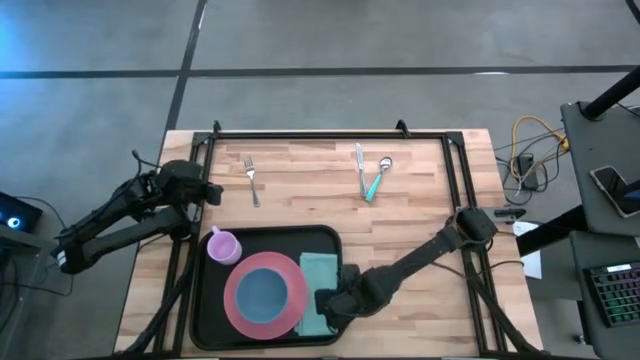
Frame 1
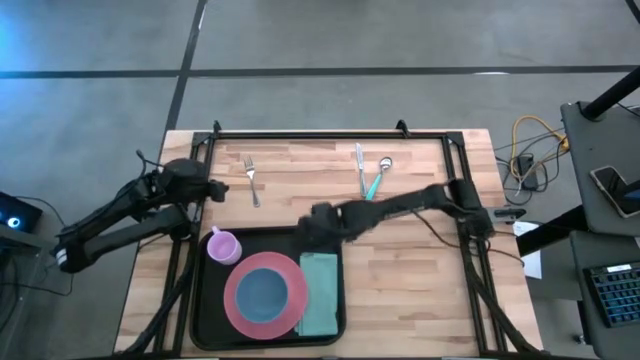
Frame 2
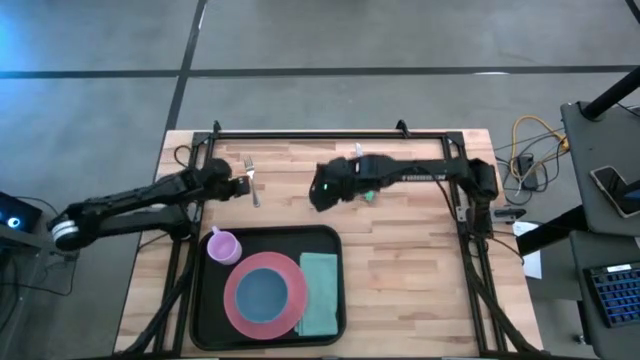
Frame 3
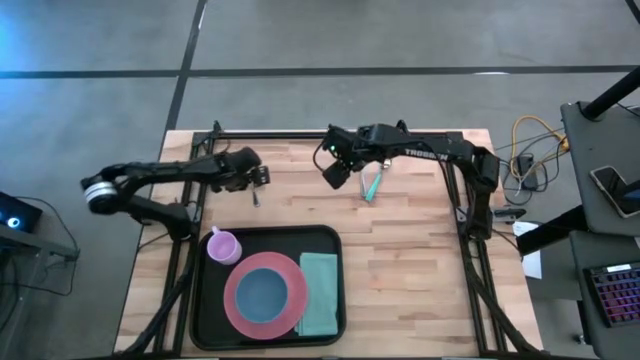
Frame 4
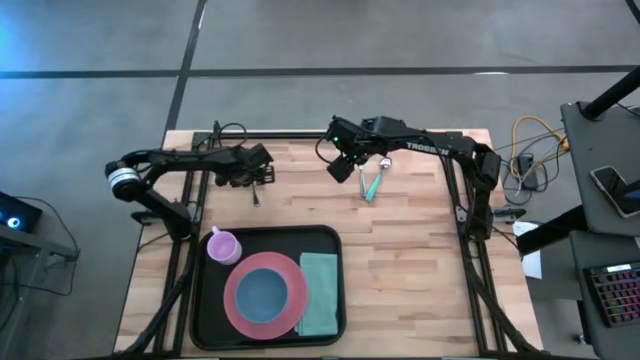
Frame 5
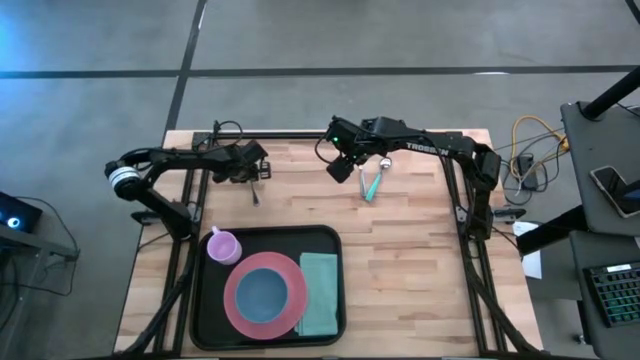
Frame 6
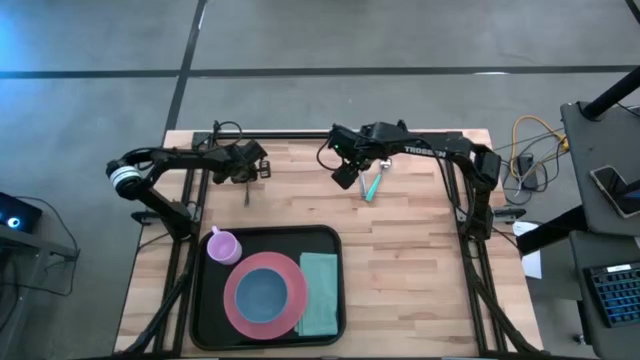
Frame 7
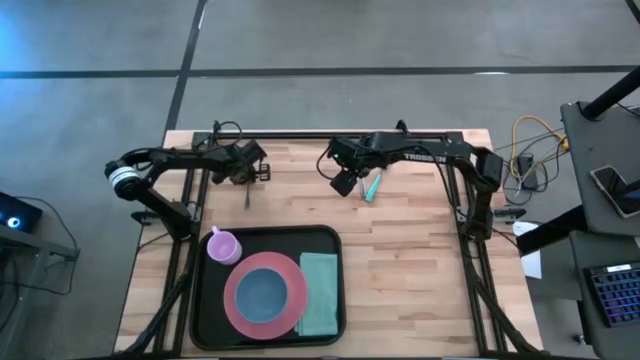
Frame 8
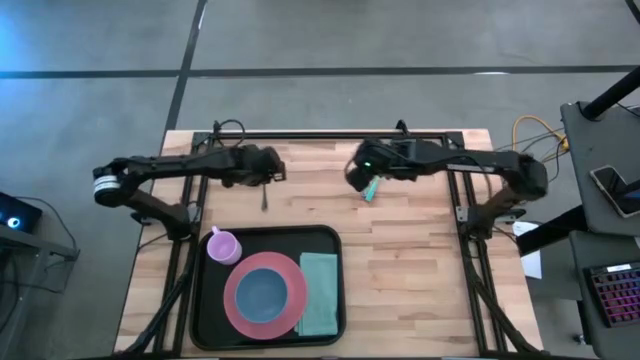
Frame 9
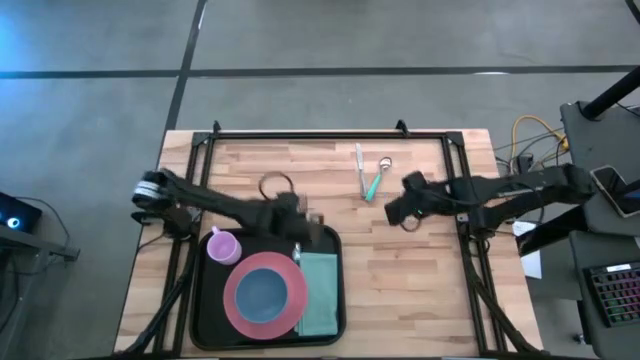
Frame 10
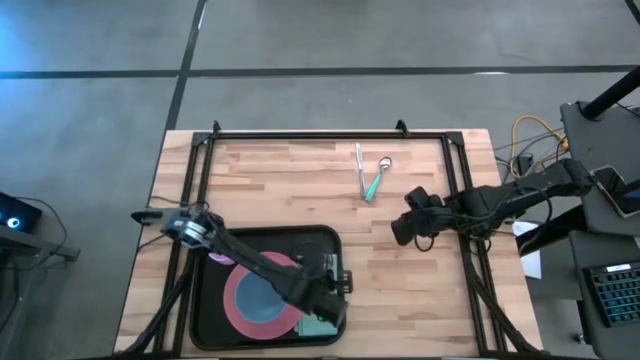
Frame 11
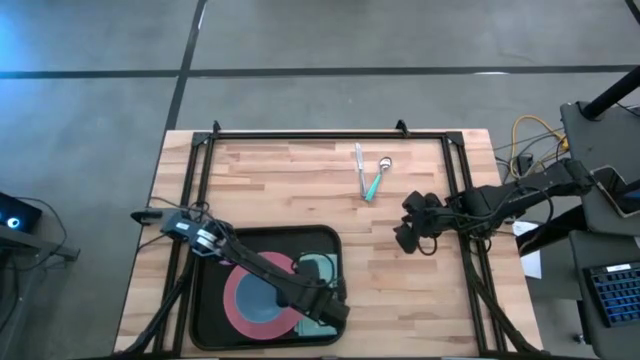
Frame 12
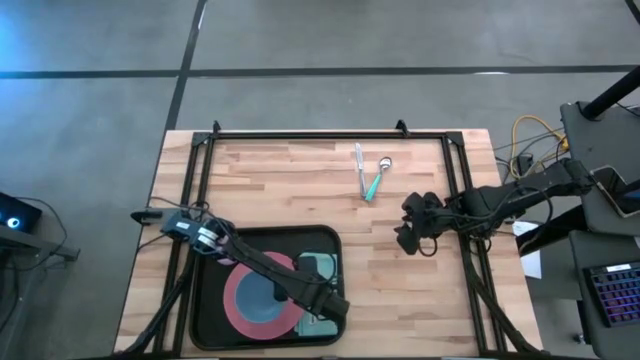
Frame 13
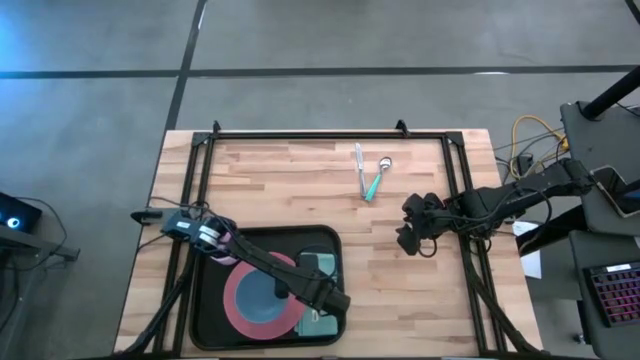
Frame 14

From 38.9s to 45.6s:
Task: Set up tray
Put the fork on top of the table napkin beside the pink plate on the black tray

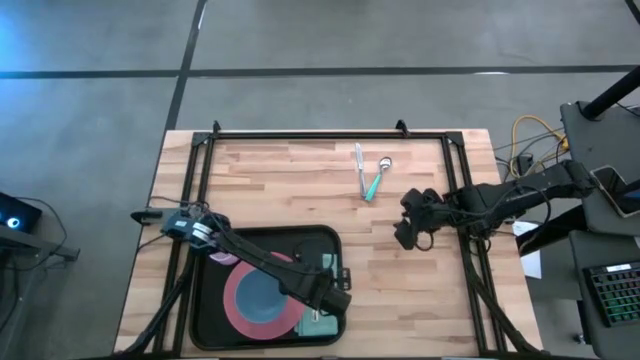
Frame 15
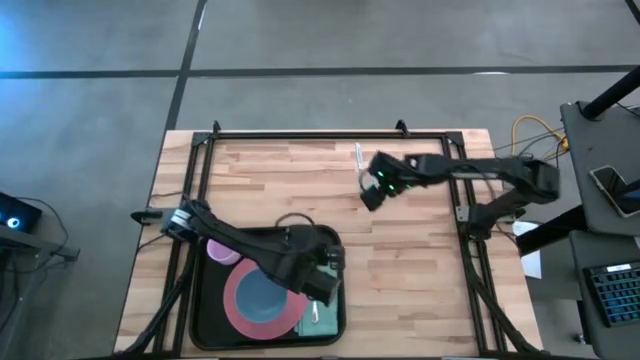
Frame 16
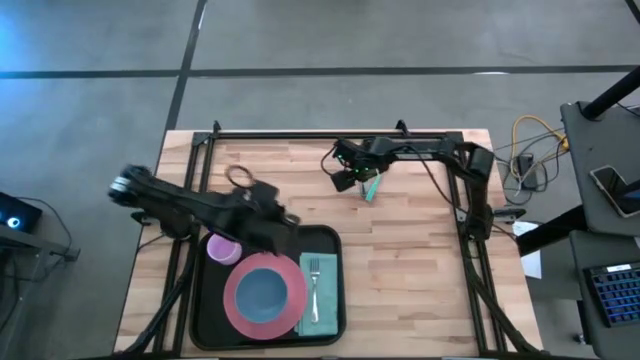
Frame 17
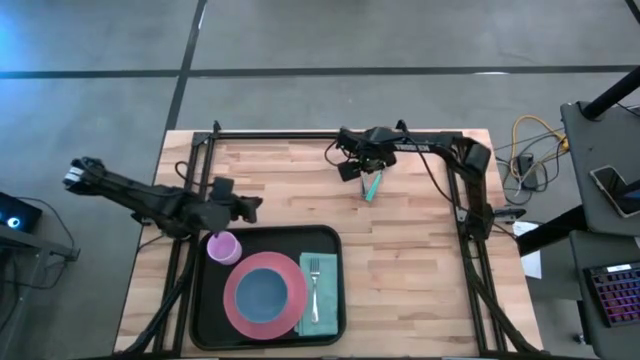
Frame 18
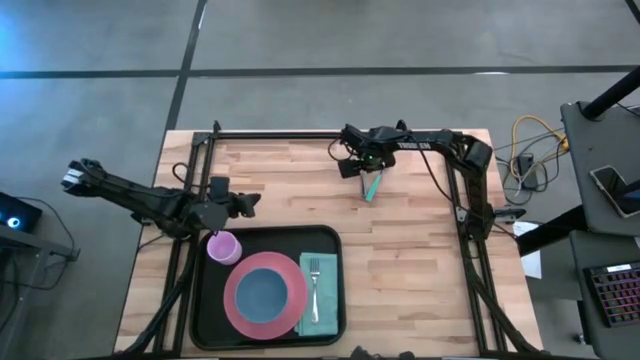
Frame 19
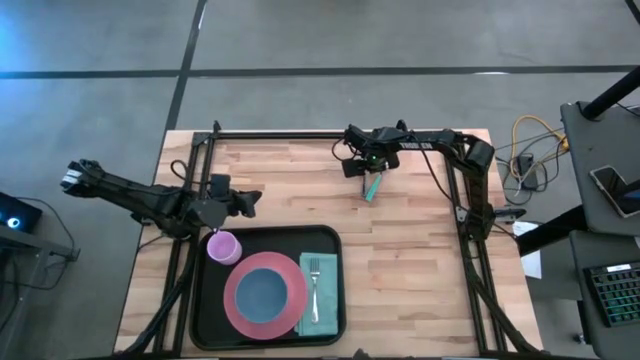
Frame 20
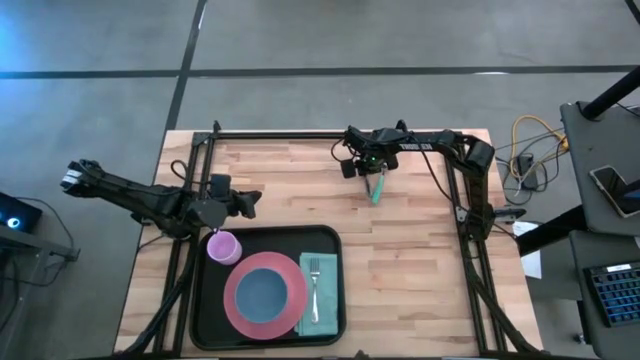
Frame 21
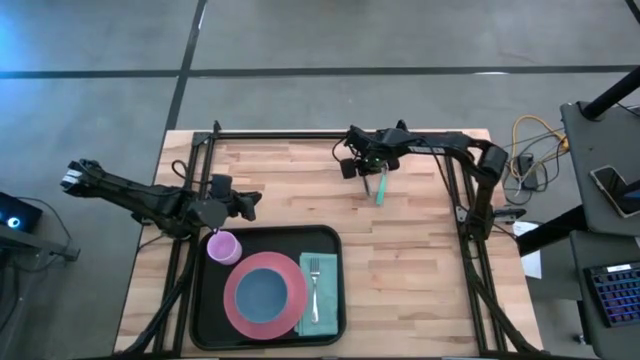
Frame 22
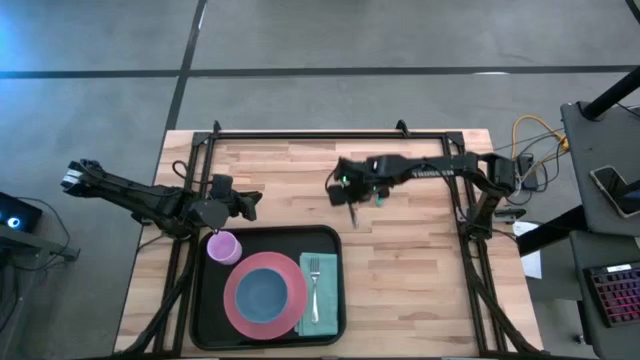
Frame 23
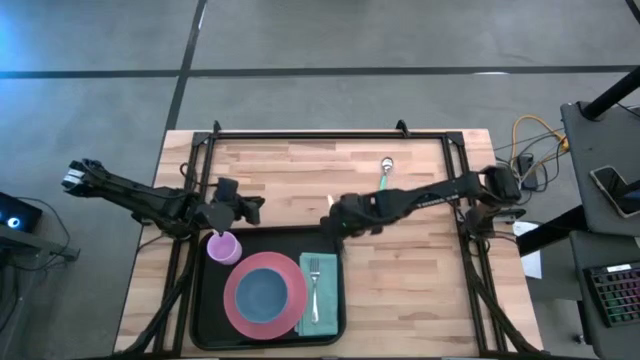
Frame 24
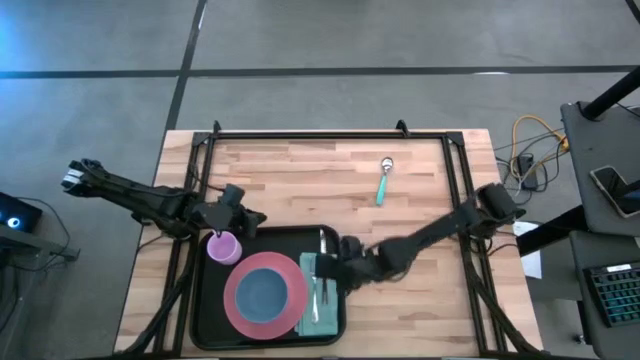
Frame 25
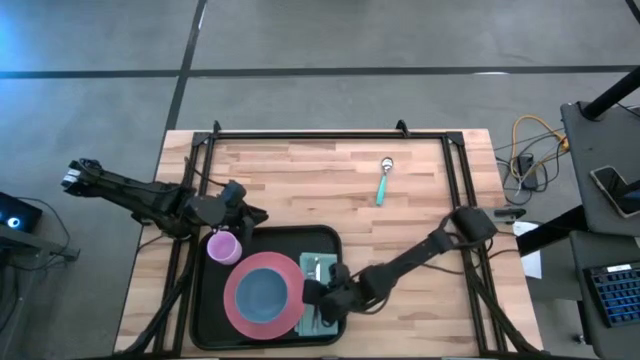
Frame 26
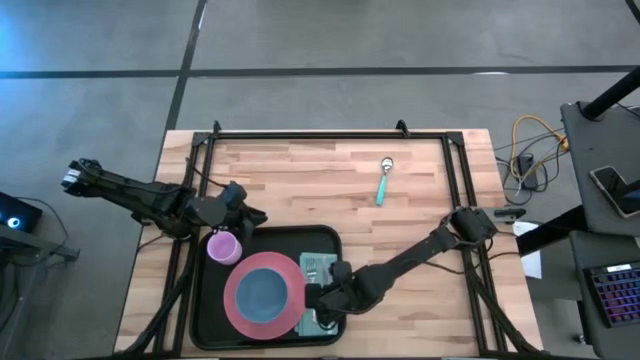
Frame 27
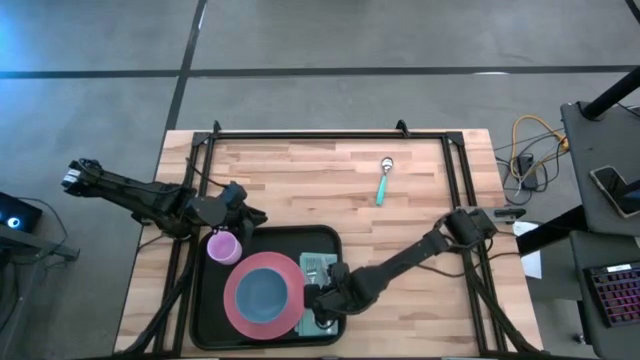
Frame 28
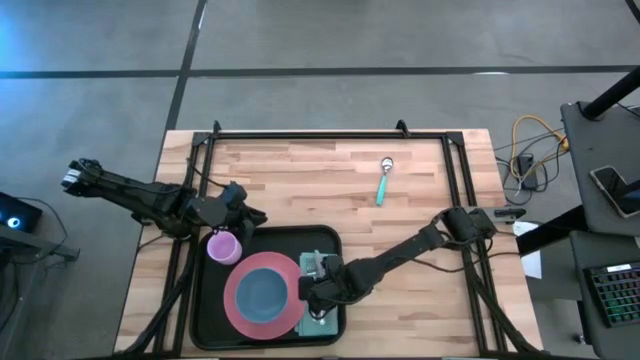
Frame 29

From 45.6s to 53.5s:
Put the knife on top of the table napkin beside the fork on the black tray

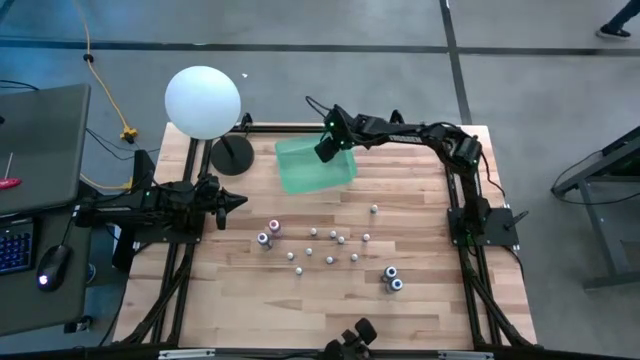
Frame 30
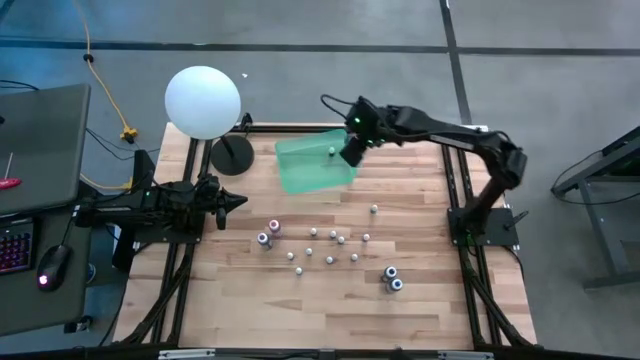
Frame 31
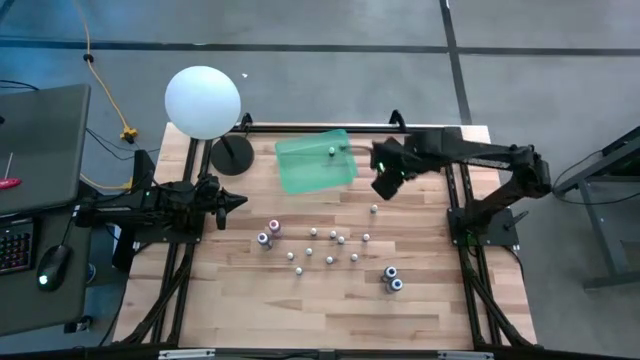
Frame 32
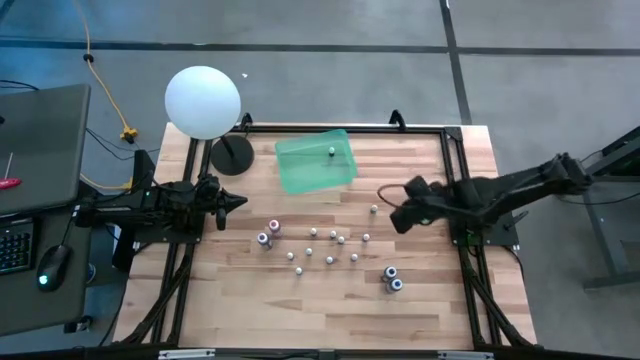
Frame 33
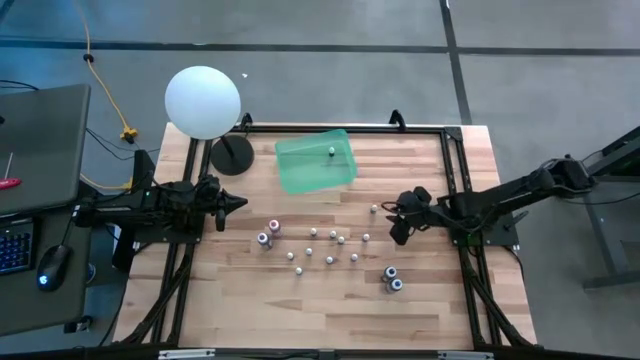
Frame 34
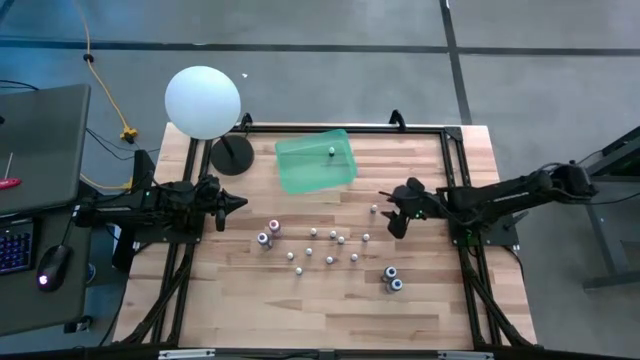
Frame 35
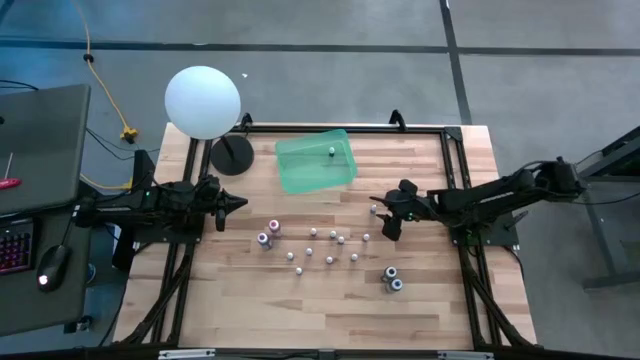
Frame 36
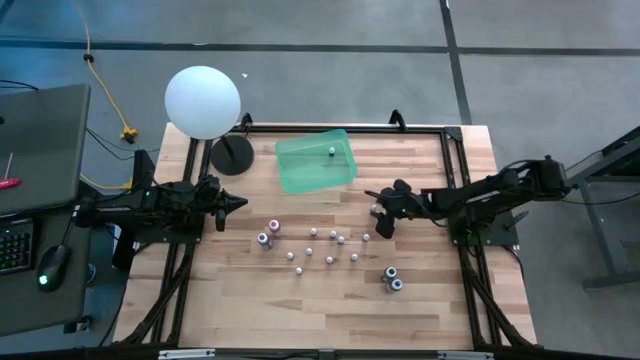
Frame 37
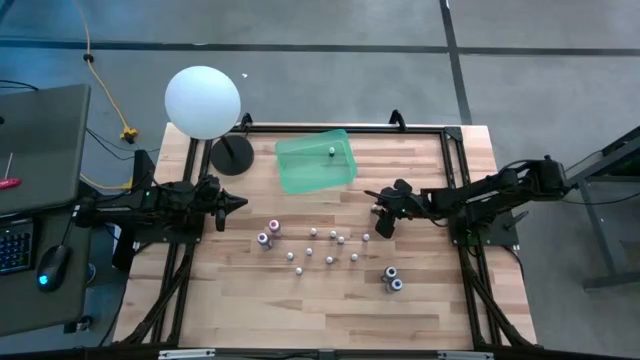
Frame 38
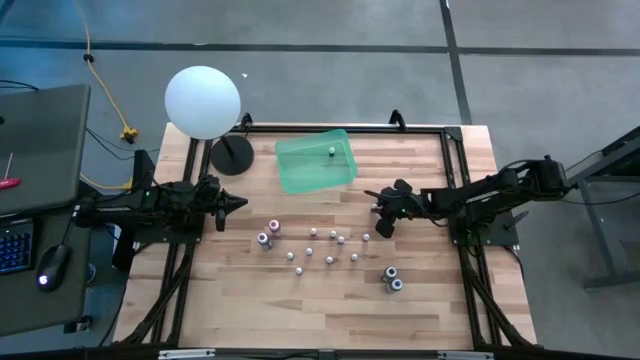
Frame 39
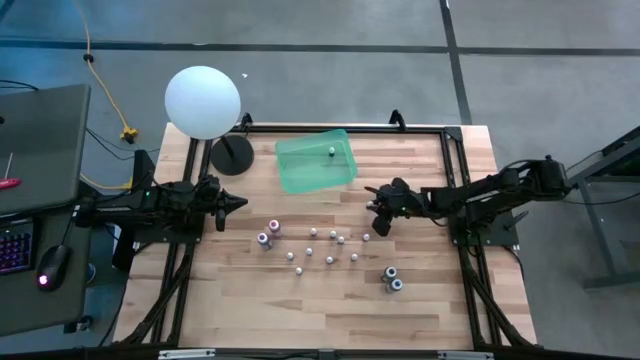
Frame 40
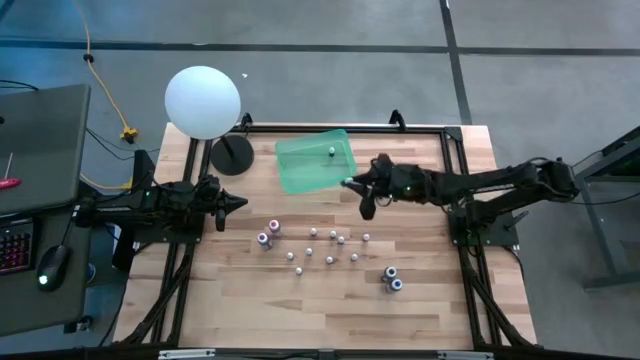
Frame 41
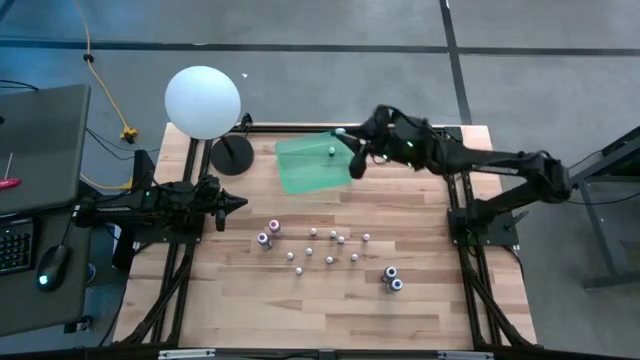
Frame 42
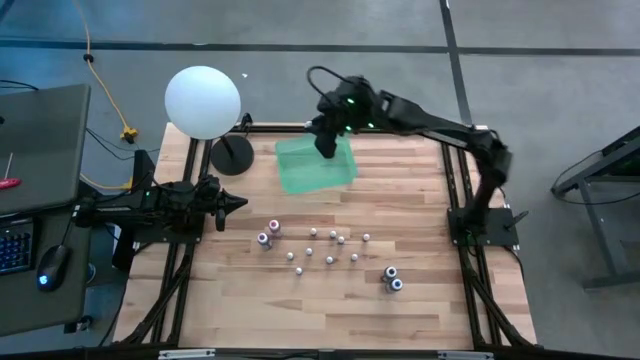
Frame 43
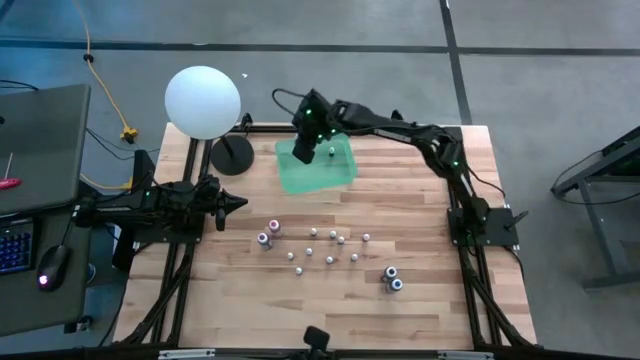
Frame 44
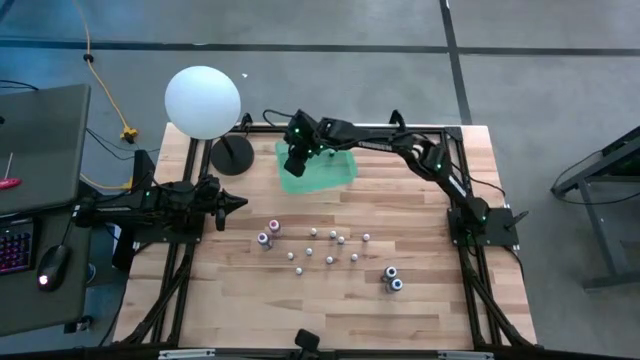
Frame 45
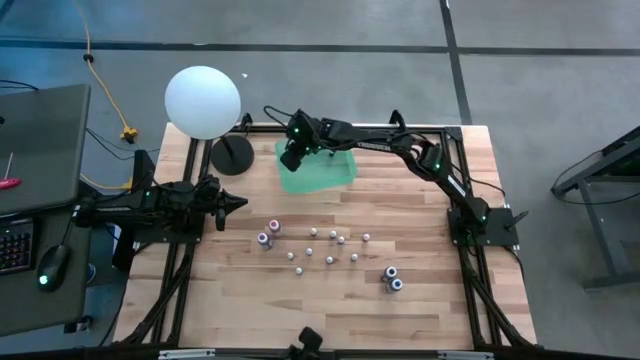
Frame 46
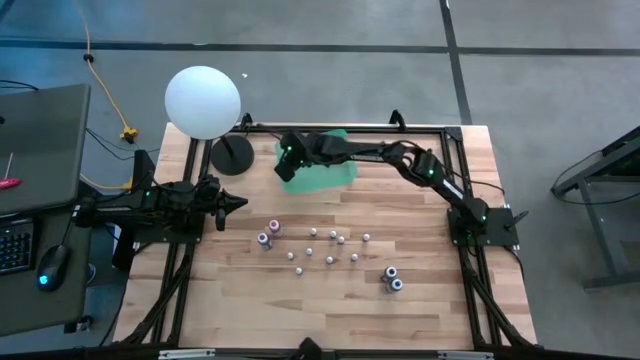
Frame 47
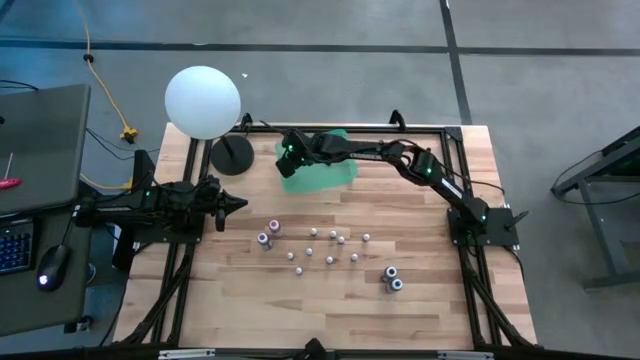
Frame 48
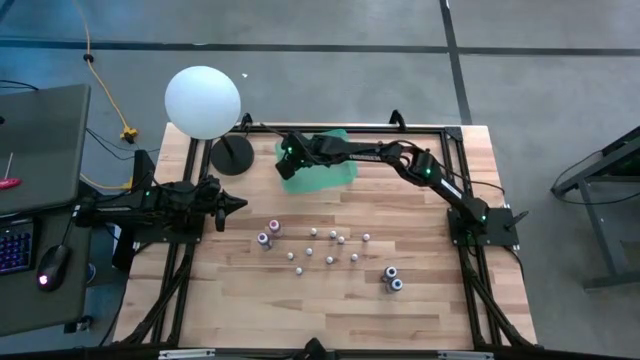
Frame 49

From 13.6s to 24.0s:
Task: Pick & Place food coloring
Put the small blue dye bottle in the green bin
